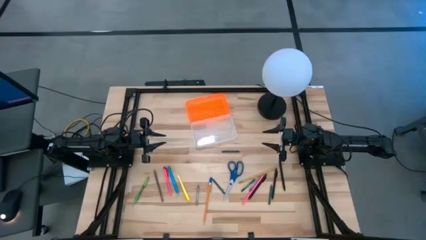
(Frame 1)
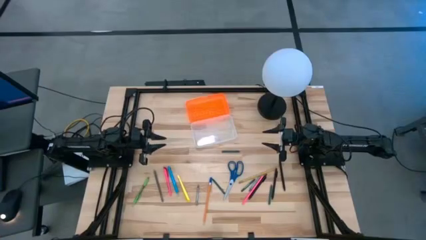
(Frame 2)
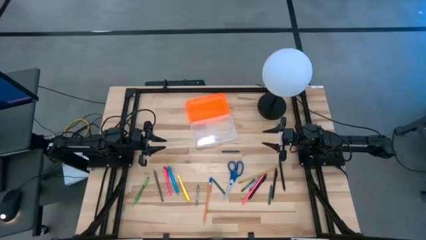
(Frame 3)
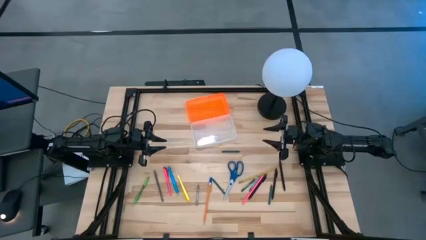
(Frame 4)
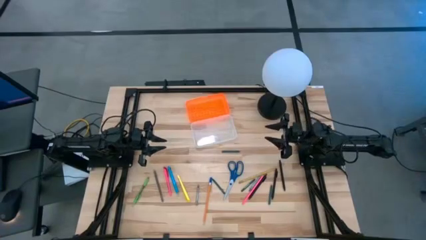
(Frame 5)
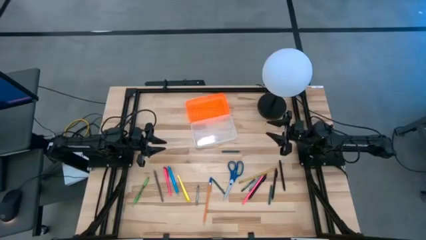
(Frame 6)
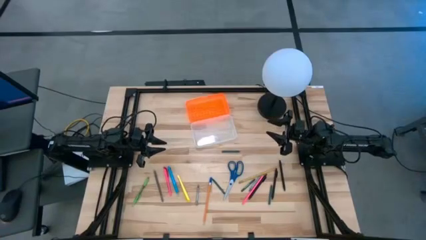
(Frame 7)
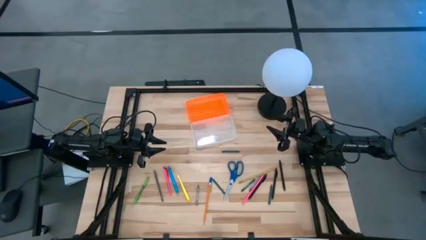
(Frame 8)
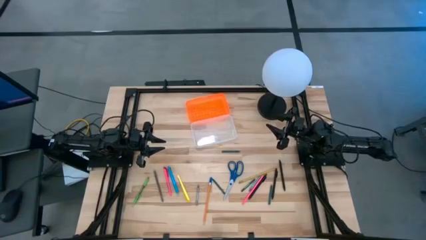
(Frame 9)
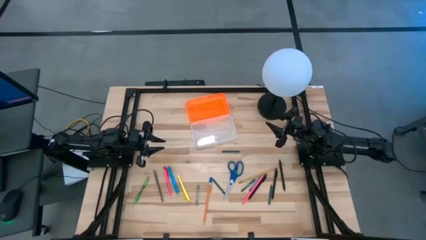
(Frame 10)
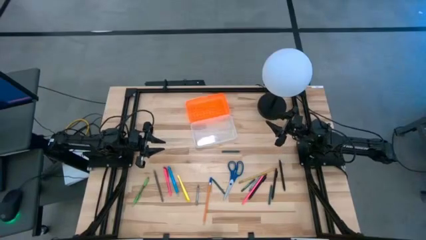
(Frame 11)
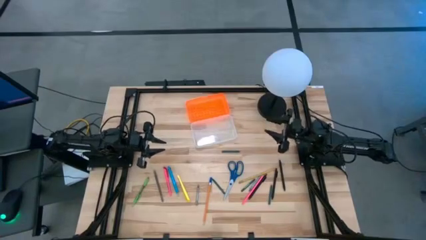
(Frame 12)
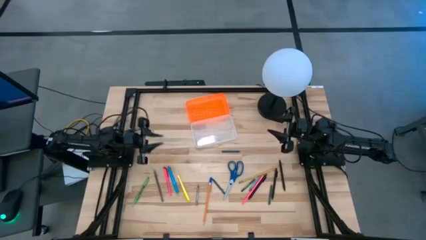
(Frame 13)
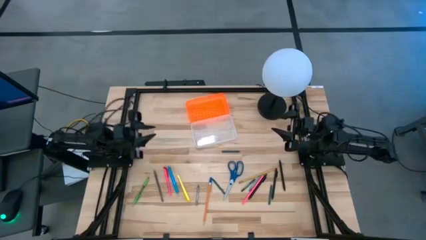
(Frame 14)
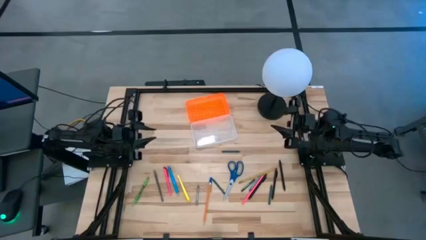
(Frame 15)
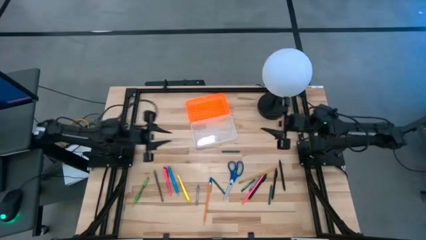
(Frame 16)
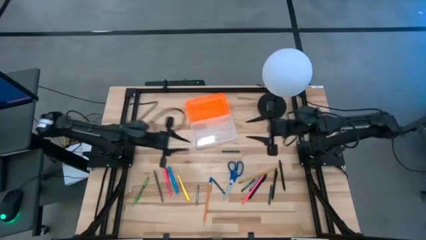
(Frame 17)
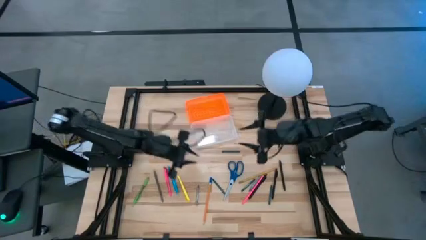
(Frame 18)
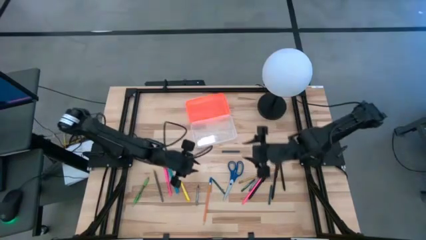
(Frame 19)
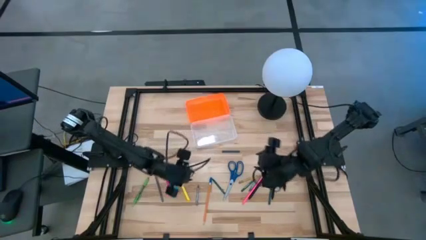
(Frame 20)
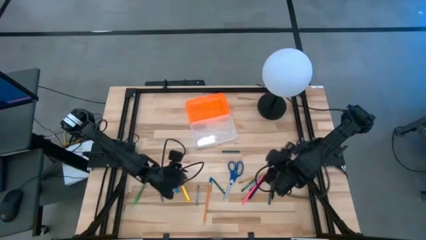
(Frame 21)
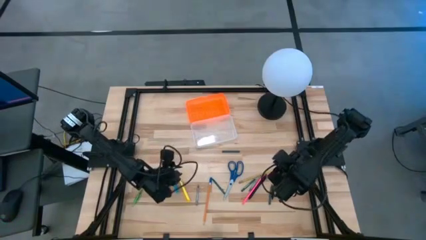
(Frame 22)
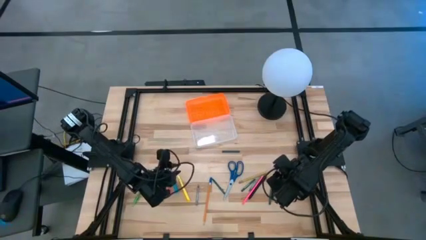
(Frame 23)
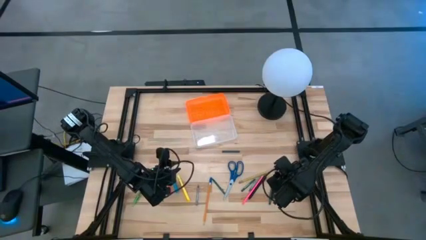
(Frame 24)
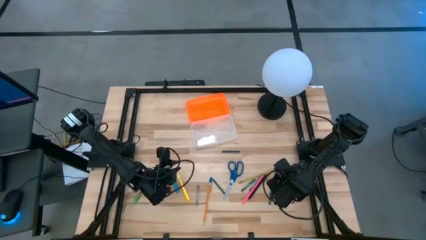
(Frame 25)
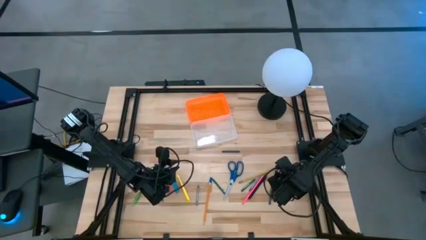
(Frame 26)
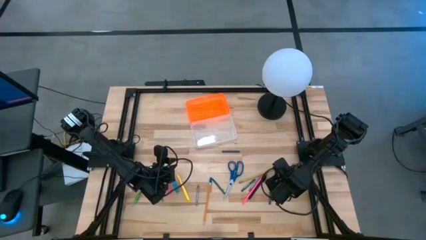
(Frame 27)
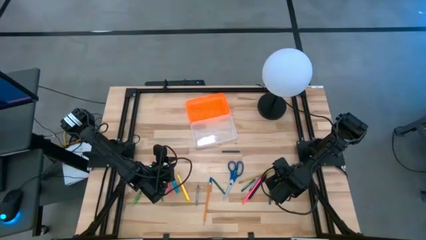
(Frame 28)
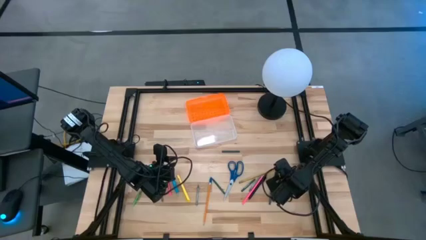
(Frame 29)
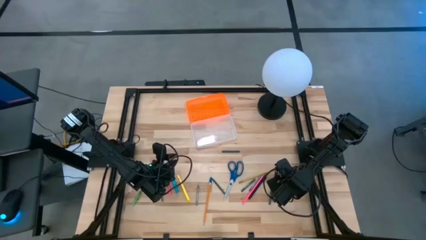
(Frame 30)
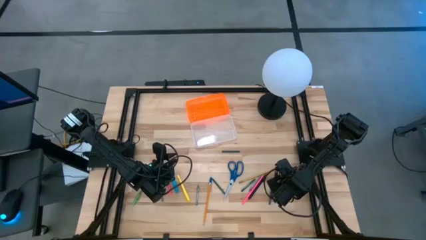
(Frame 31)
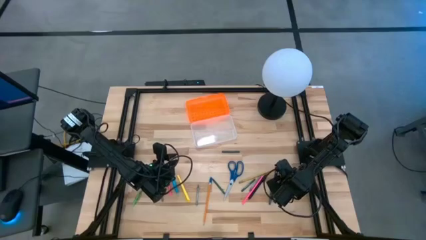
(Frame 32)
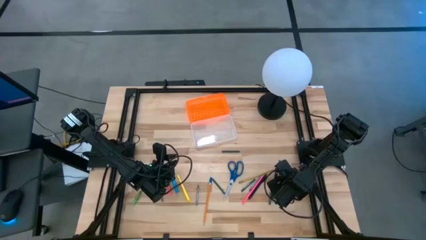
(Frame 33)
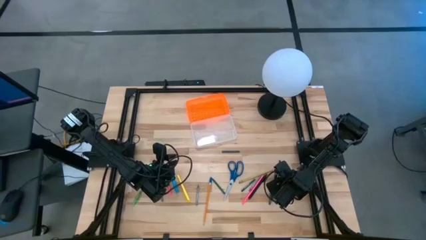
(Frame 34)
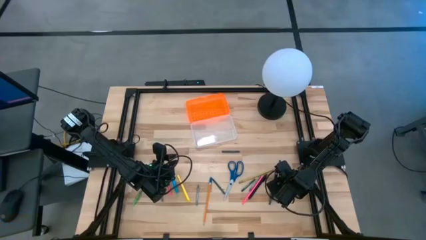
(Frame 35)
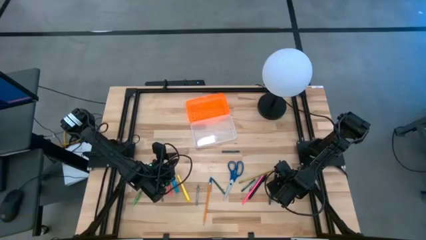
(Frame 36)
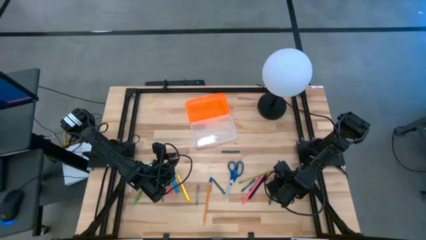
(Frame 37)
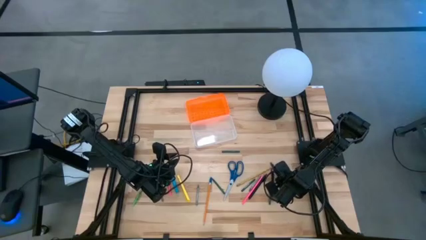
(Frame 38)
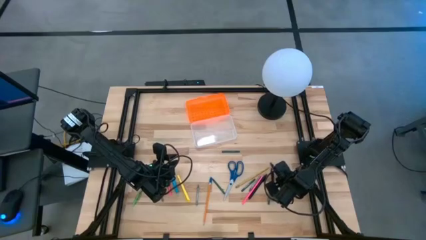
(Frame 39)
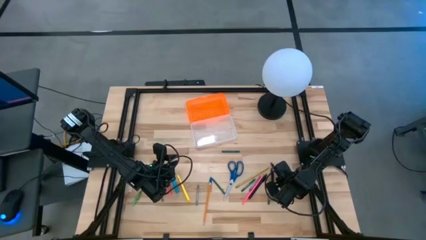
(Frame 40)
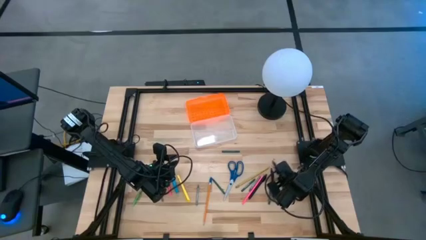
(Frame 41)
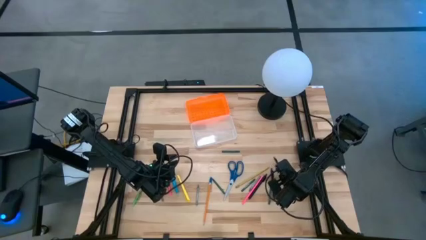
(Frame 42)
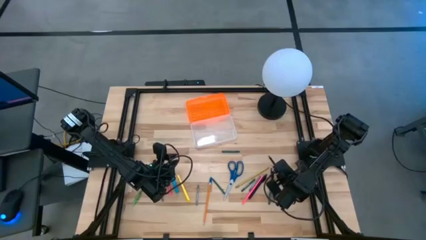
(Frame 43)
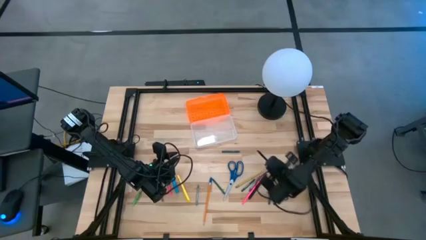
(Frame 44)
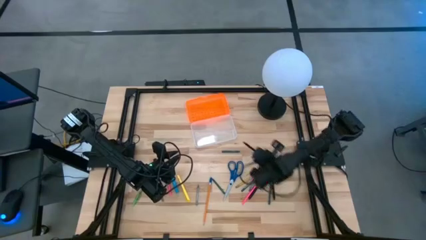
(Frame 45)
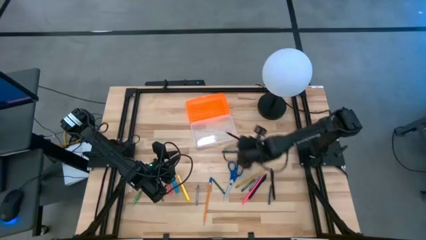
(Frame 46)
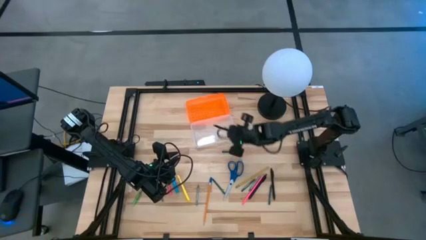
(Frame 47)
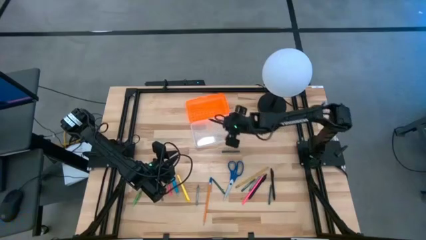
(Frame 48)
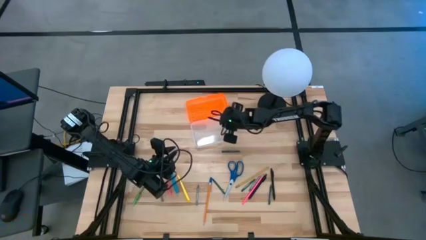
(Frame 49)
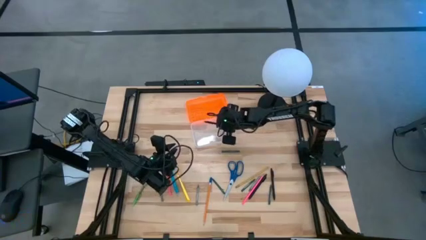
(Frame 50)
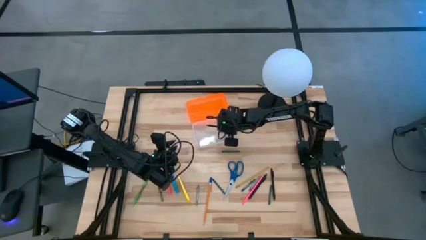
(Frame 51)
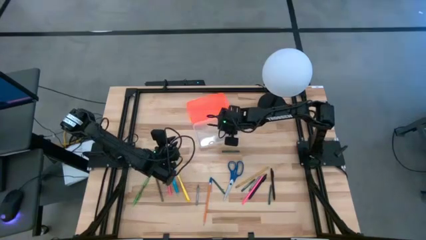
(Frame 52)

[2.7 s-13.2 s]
Task: Pick & place school supplies into a supply box
Put the right black pen into the supply box

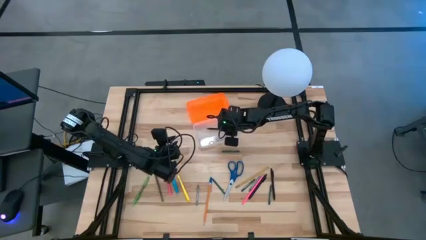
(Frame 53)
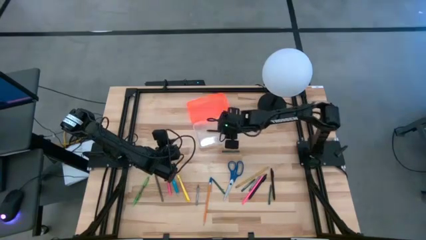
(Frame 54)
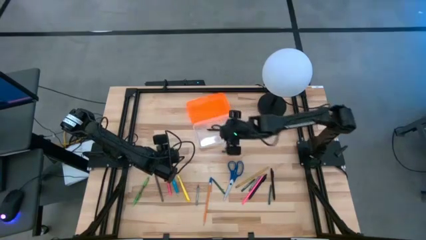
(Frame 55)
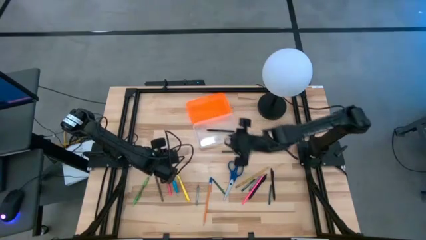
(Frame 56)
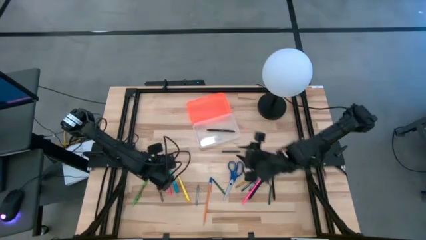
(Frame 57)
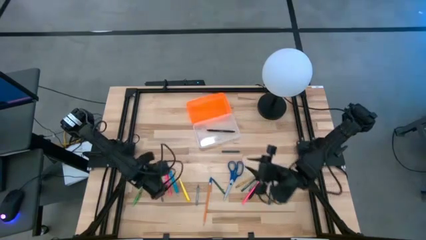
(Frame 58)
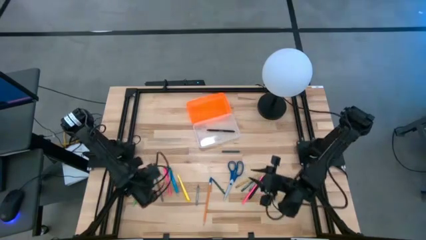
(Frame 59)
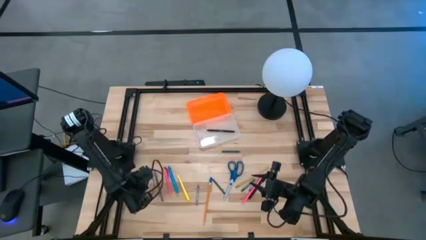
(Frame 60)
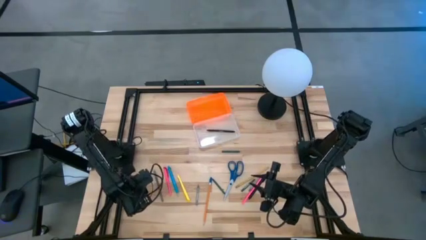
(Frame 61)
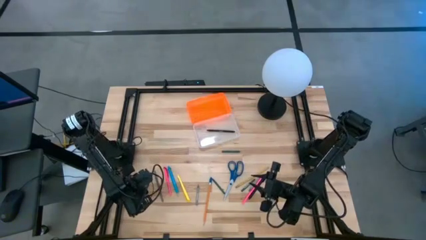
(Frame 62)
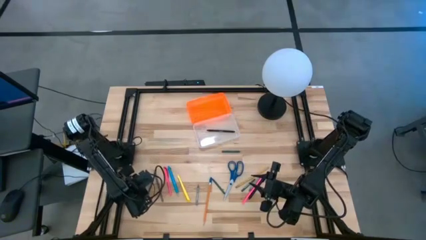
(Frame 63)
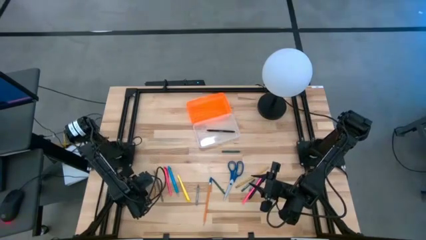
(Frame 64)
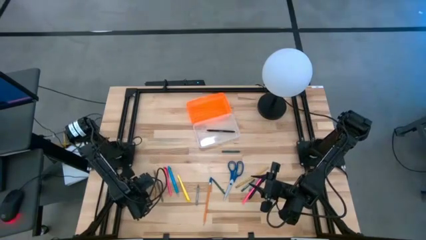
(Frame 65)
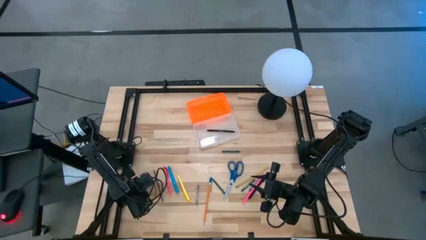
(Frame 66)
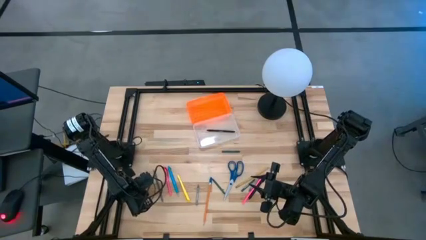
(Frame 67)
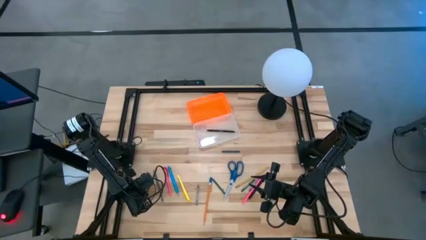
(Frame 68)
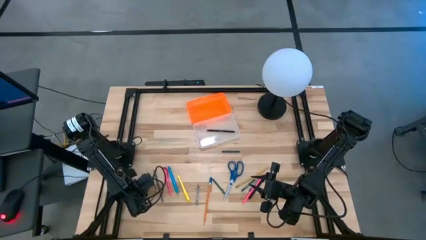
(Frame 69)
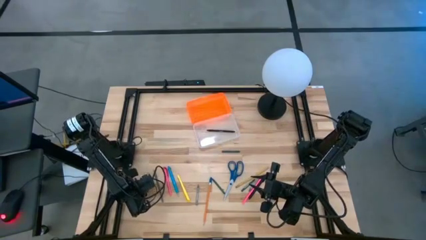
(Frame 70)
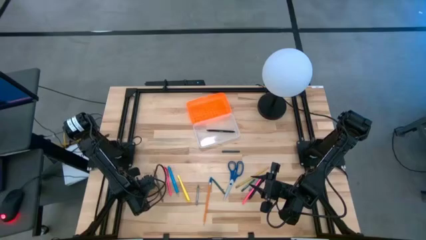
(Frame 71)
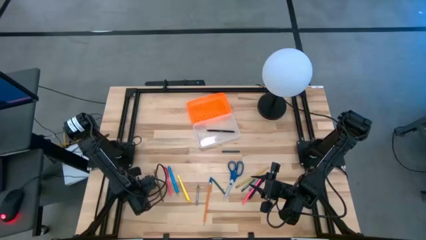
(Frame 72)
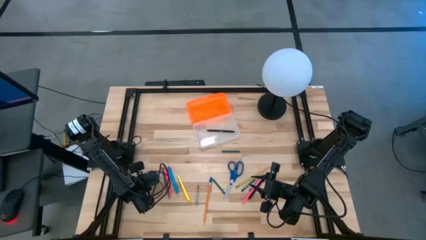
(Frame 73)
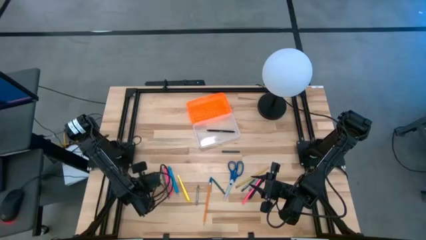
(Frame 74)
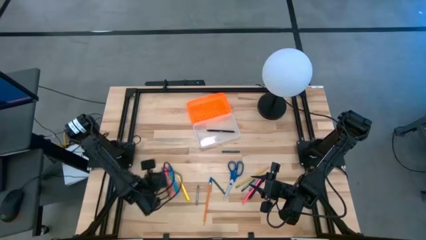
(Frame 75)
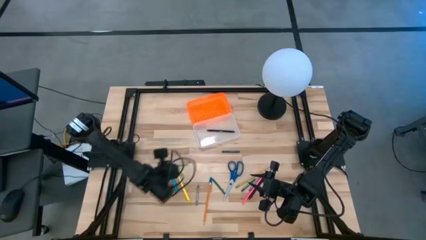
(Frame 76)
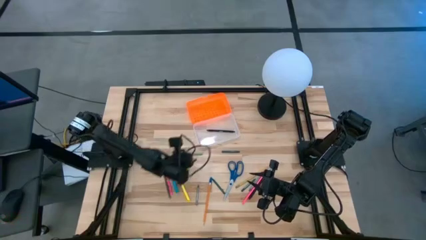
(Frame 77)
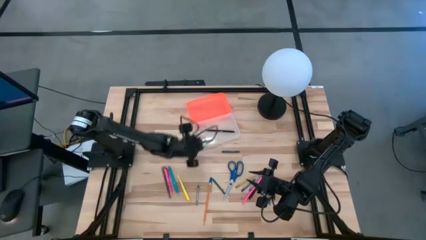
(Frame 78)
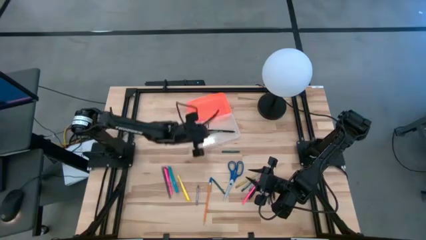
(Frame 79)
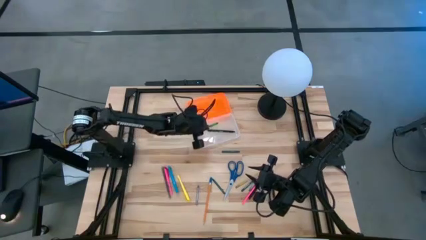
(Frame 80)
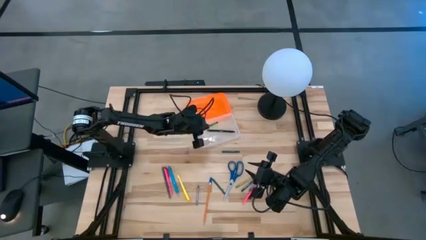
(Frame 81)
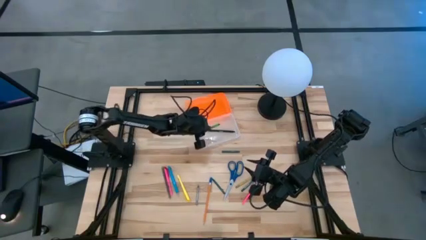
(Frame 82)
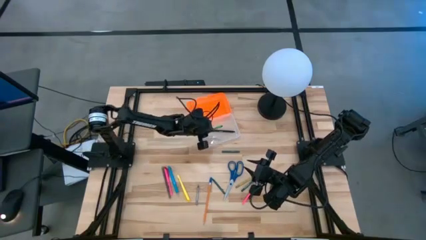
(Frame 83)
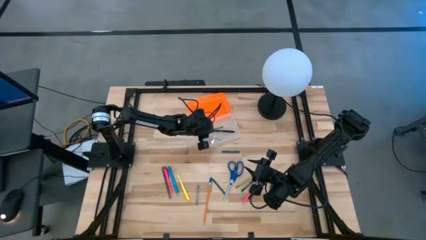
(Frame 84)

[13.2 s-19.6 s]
Put the green pen into the supply box
